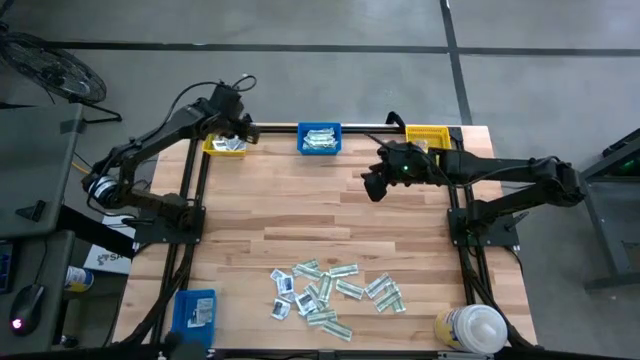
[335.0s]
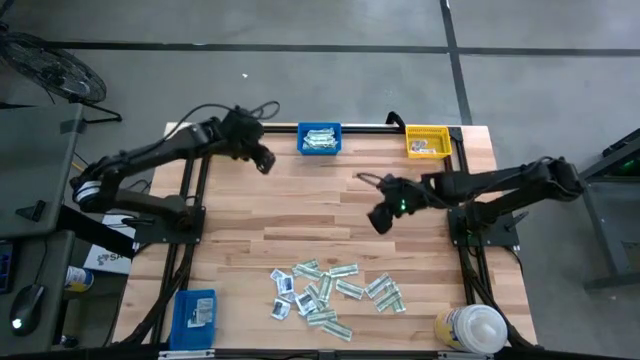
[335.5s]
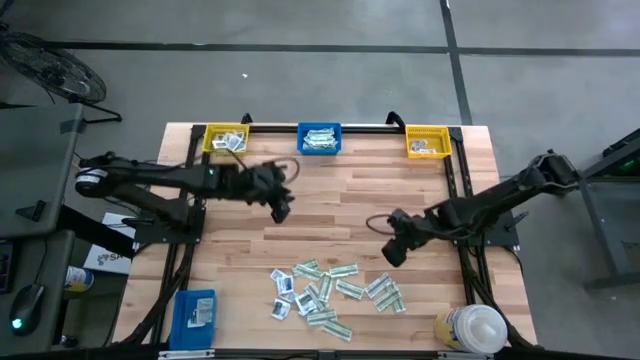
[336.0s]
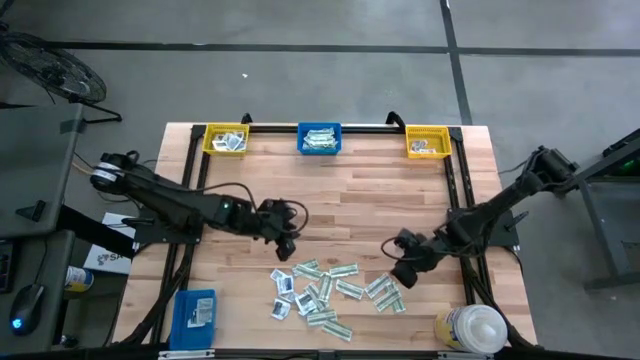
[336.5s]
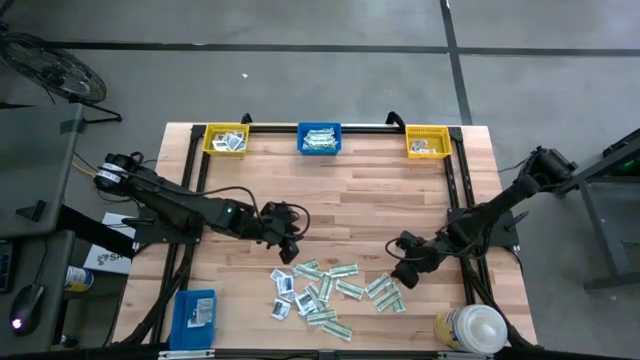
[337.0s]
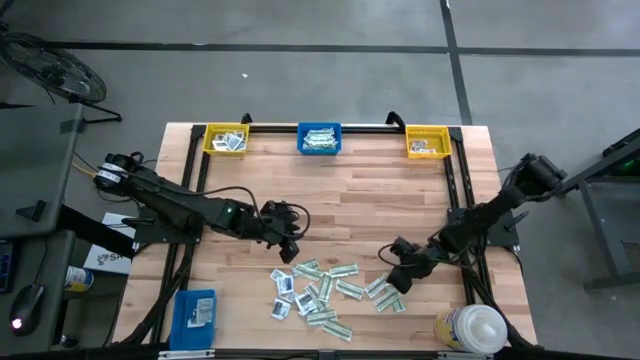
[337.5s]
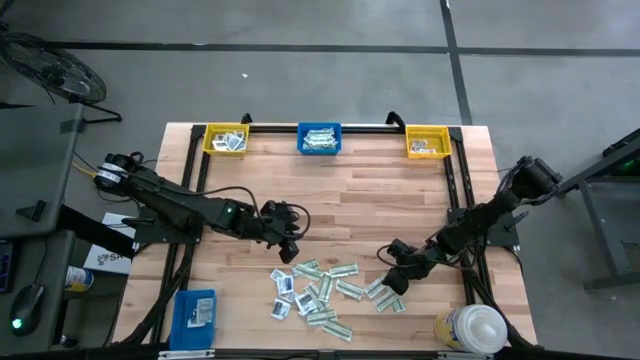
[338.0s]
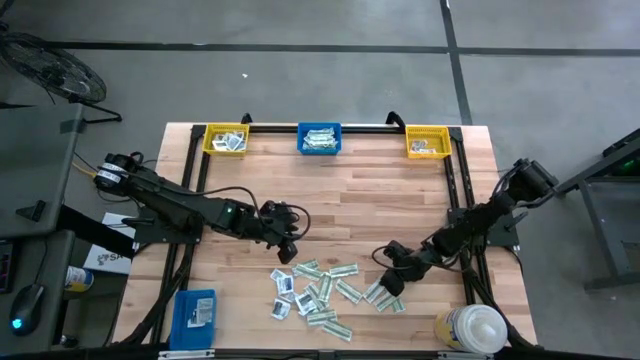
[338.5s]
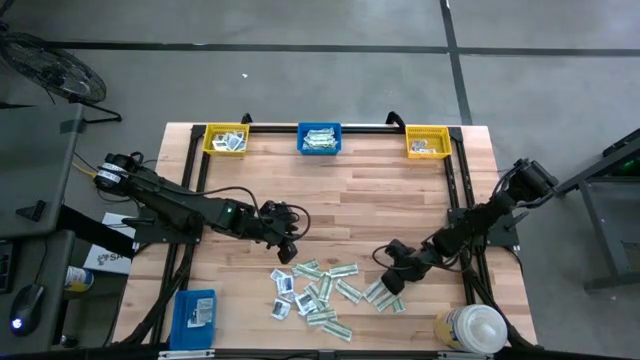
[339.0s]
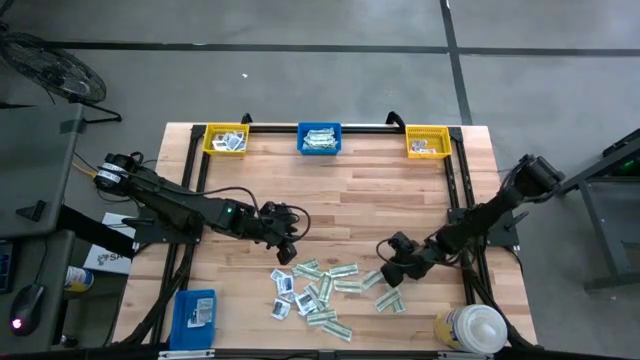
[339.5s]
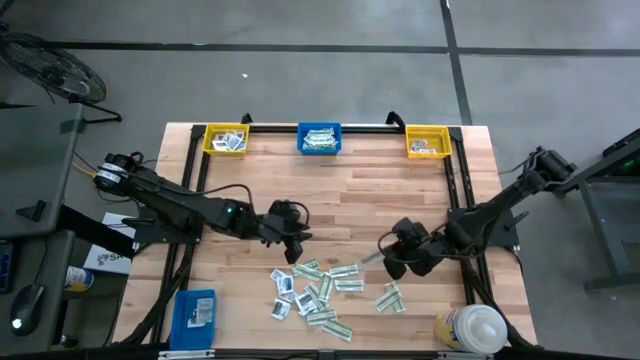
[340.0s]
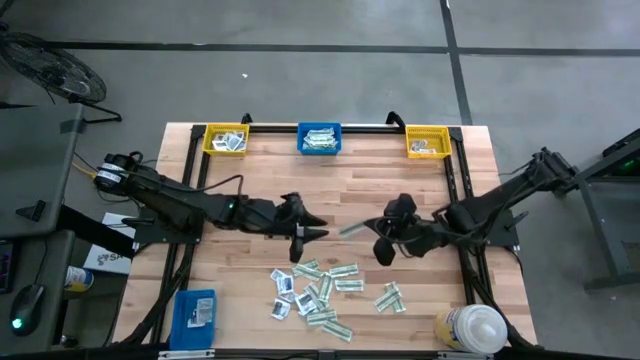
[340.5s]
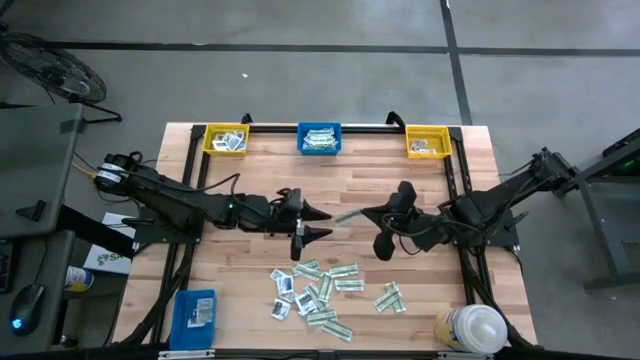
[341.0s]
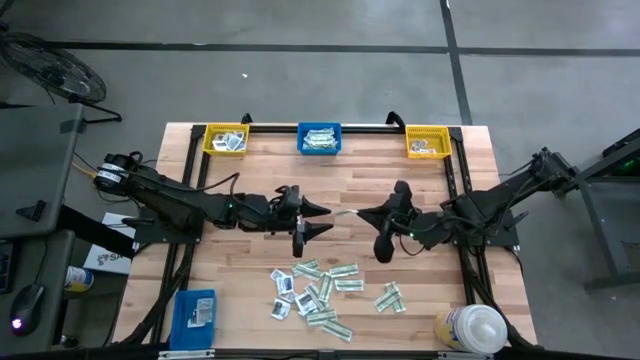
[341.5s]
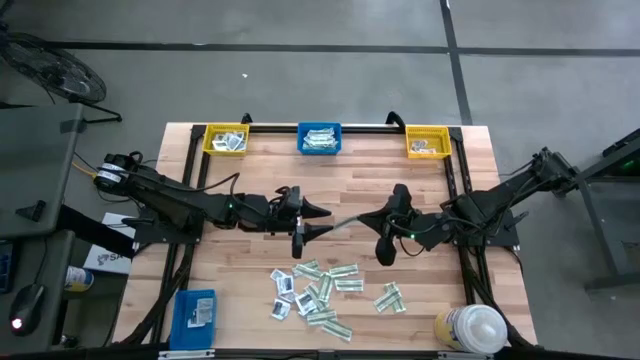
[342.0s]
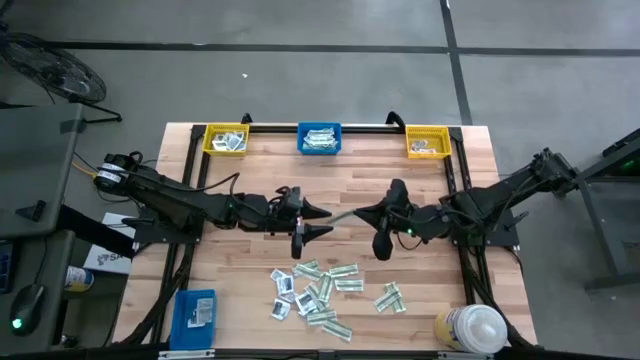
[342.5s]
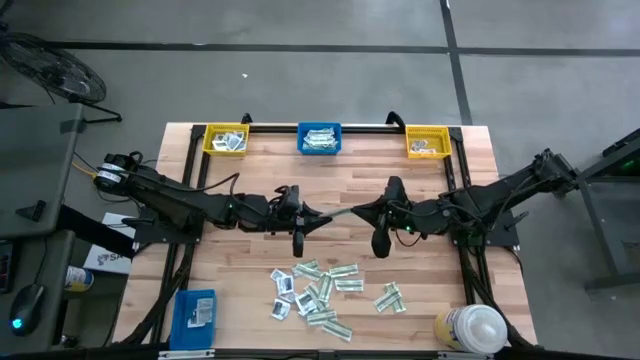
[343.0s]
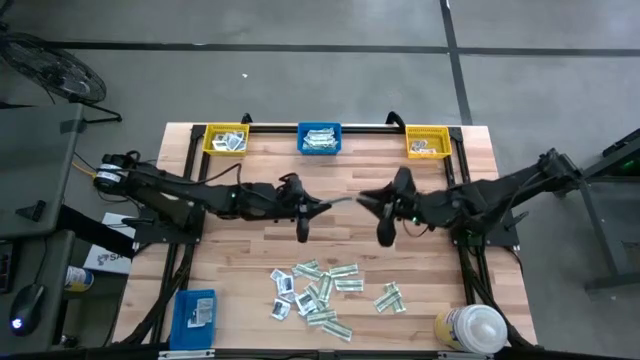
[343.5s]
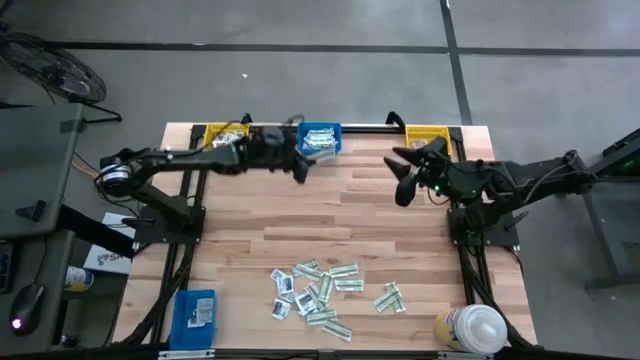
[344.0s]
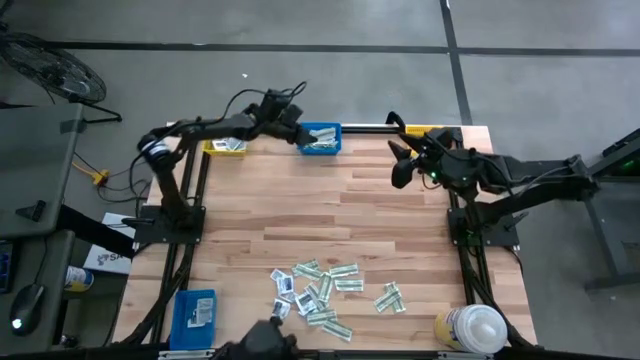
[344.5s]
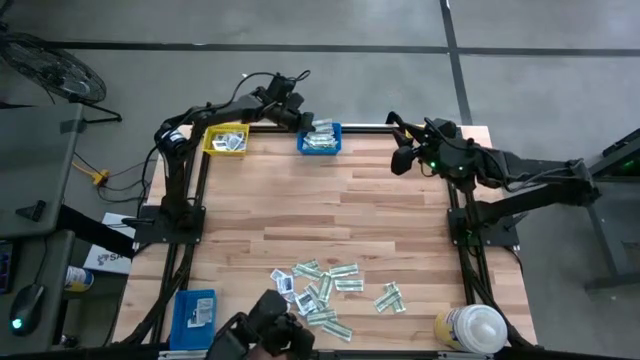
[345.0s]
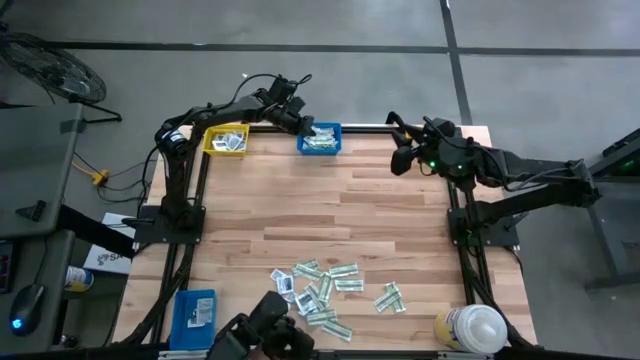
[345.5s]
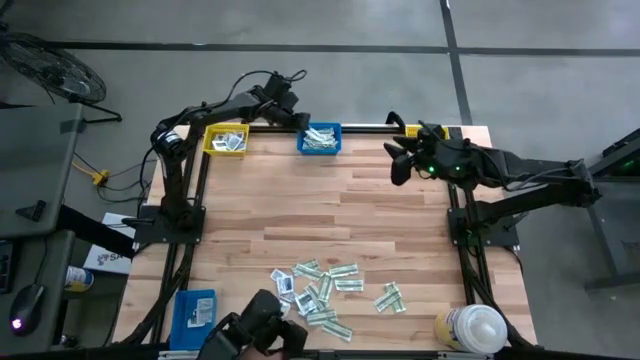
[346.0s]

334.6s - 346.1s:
Task: Pick & Place First Aid Supplies
Put the green bandage pack into the top blue bin

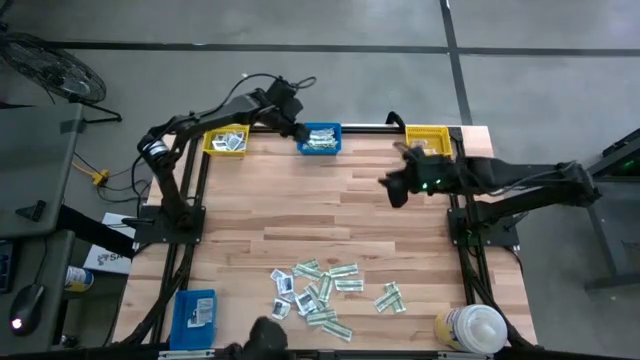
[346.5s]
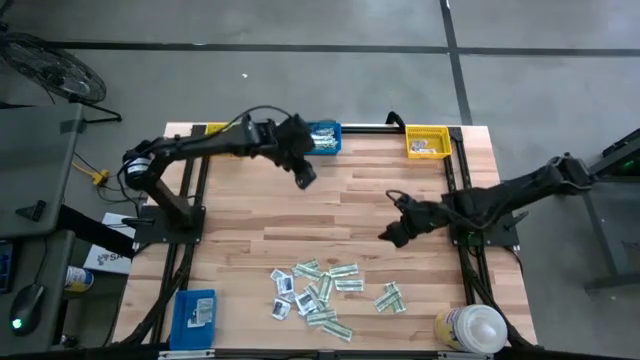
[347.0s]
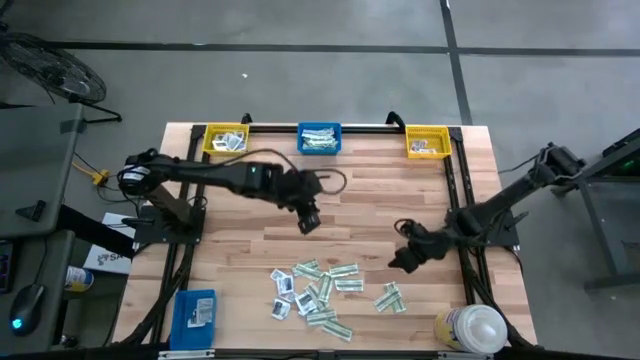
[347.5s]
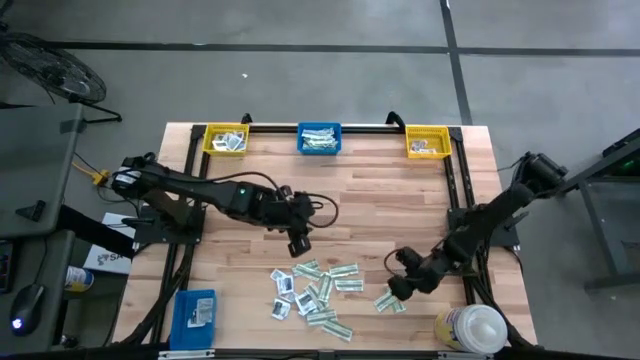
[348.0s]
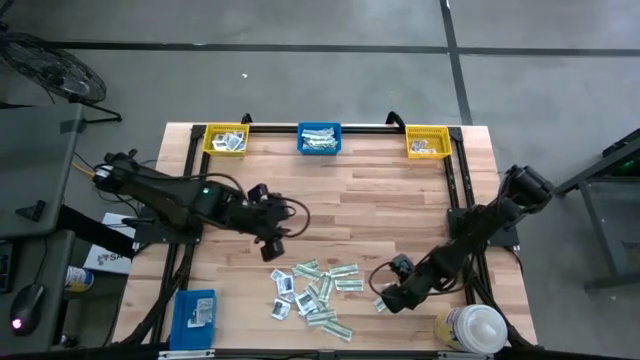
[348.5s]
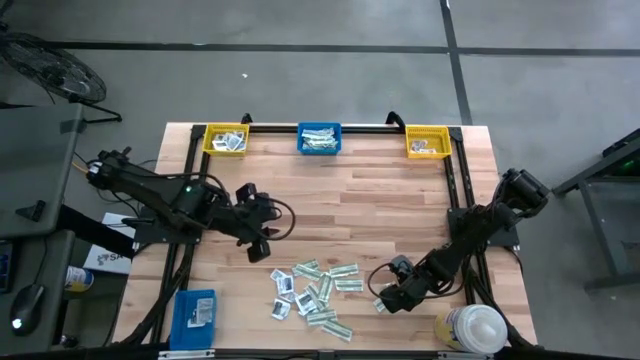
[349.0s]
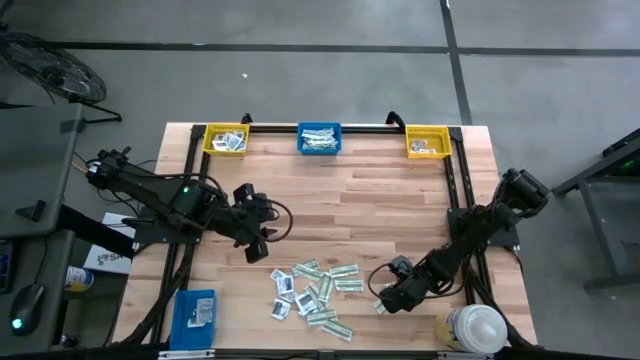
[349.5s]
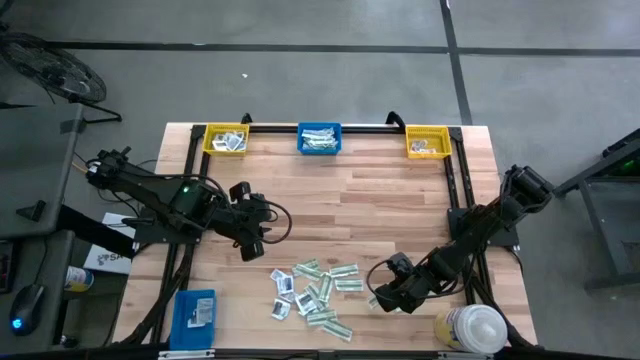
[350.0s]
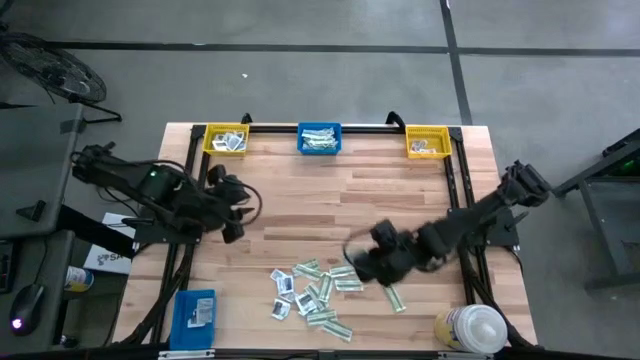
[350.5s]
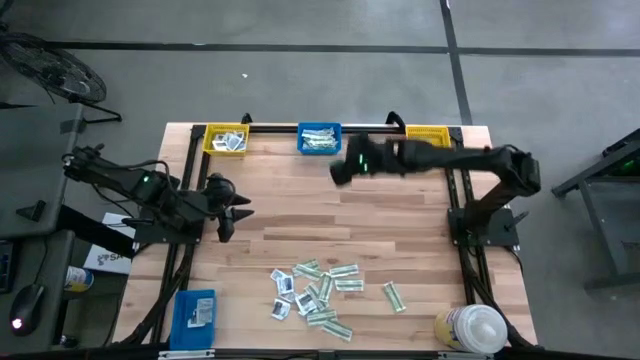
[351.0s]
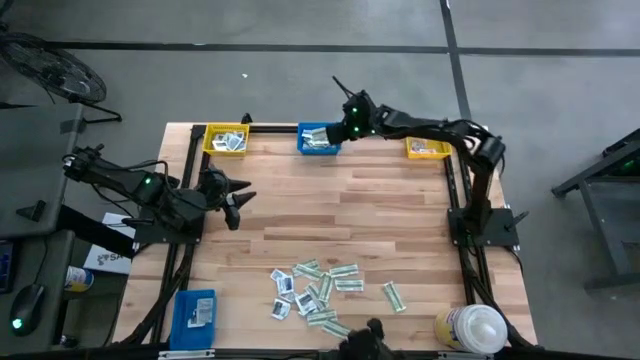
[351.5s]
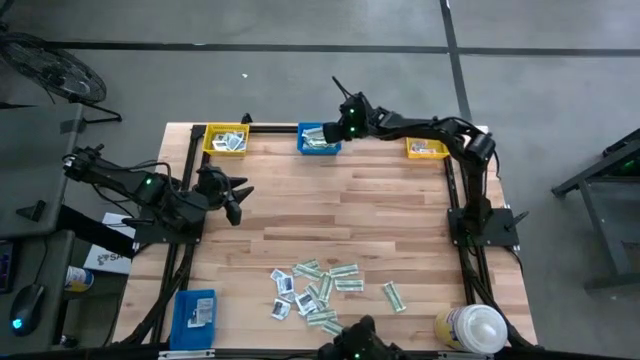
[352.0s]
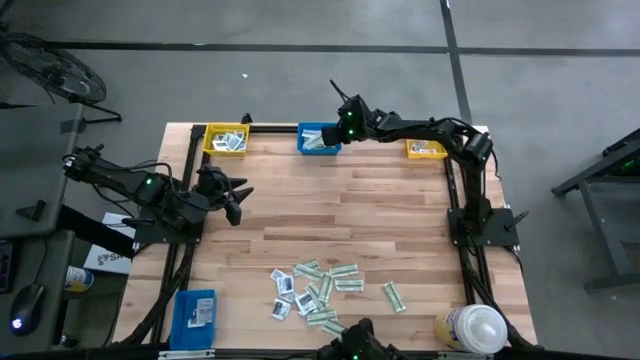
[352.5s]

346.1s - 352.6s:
Put the green bandage pack into the top blue bin

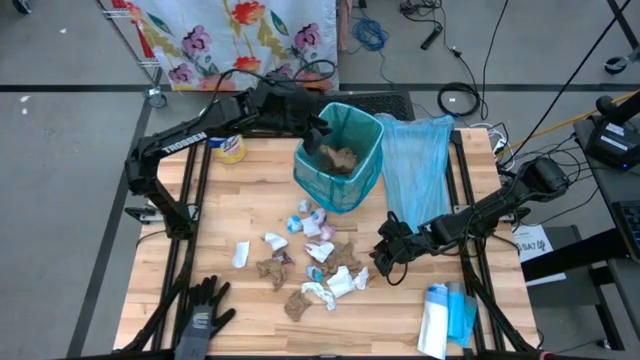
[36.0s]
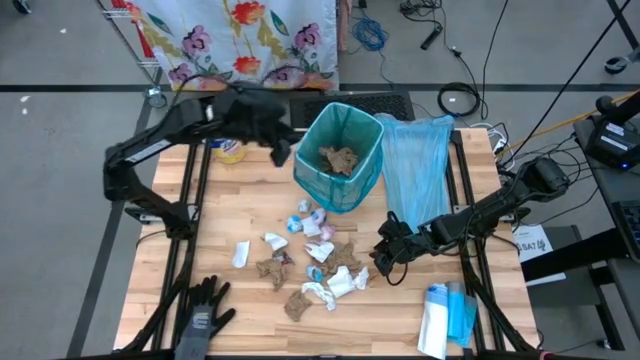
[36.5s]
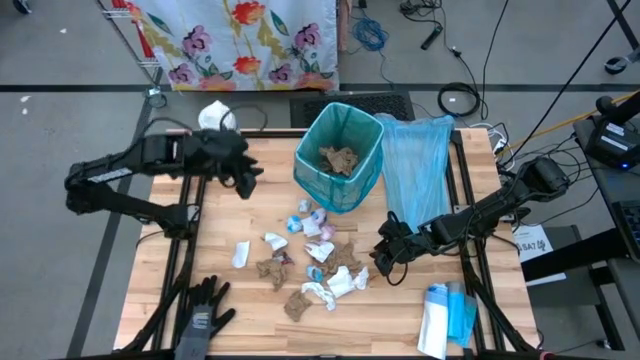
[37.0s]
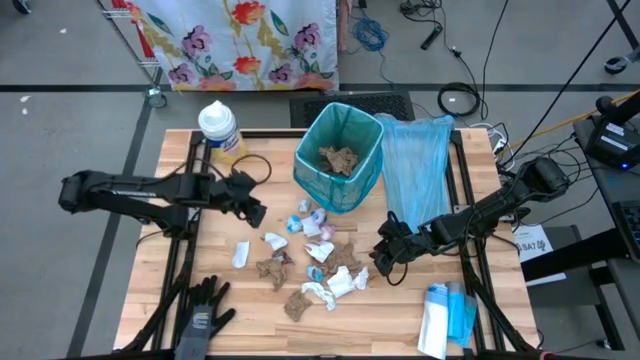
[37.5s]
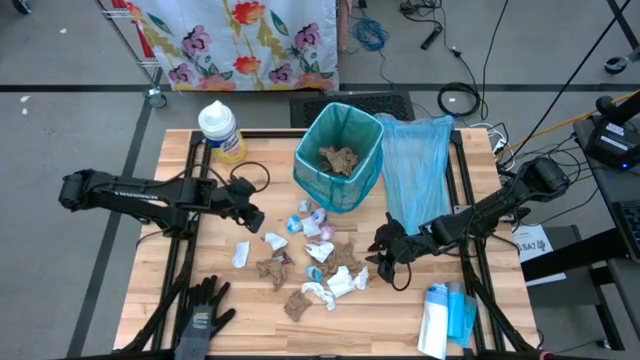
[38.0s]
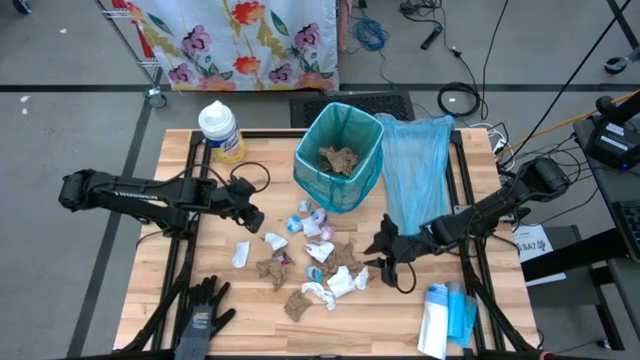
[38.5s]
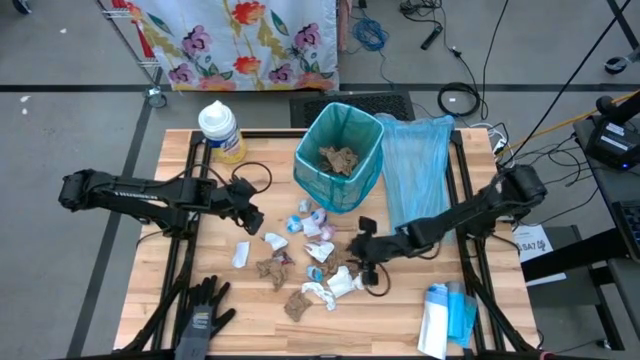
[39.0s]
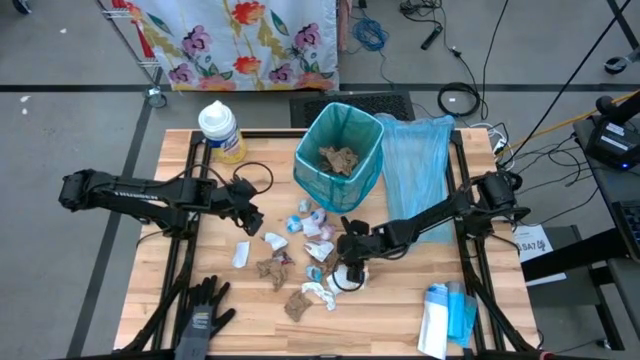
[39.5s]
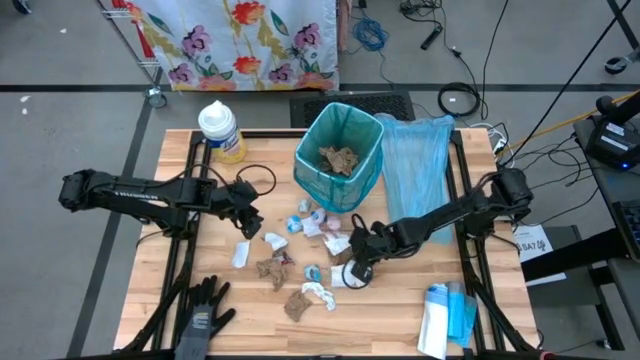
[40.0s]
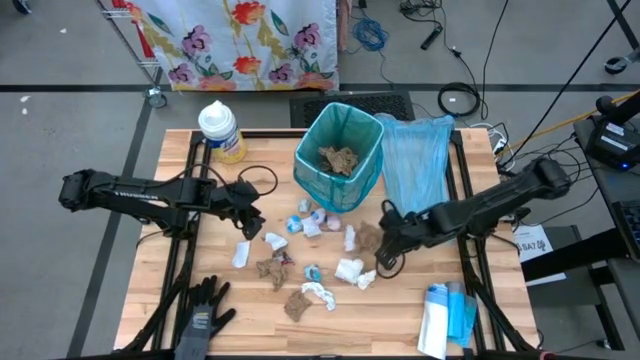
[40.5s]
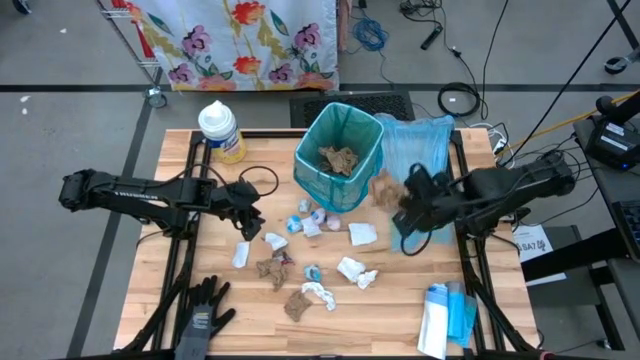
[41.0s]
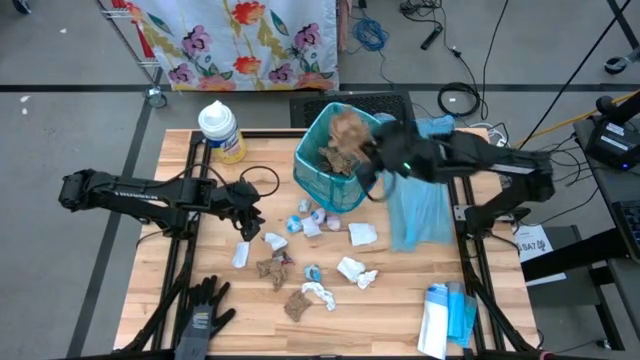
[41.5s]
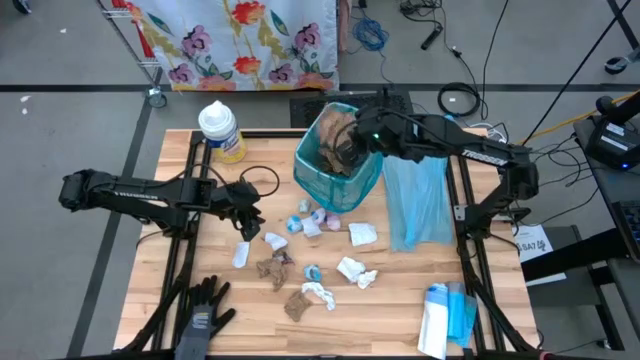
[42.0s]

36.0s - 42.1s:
Task: place trash/remove bag and relplace
Put the top right brown napkin into the trash bin
